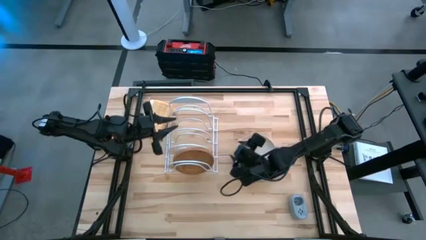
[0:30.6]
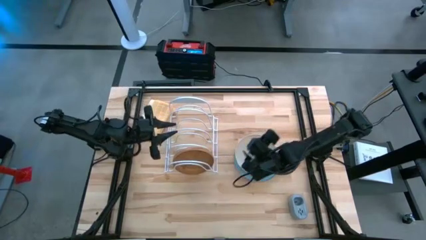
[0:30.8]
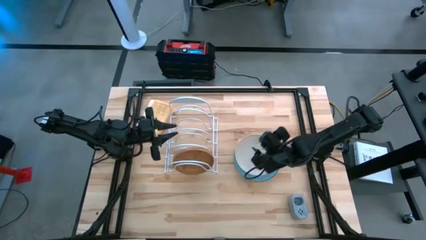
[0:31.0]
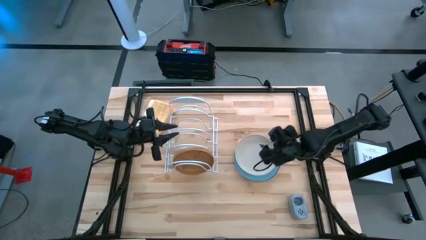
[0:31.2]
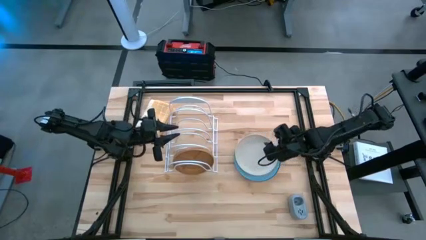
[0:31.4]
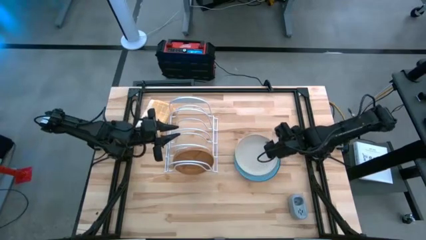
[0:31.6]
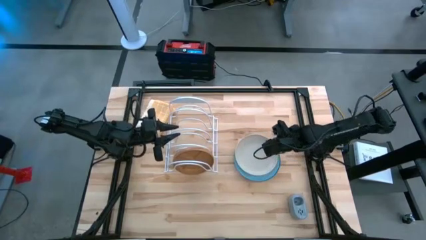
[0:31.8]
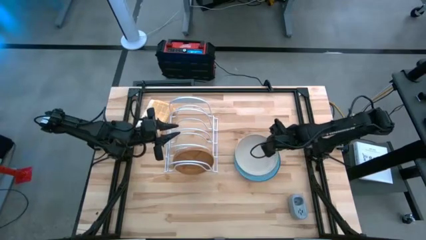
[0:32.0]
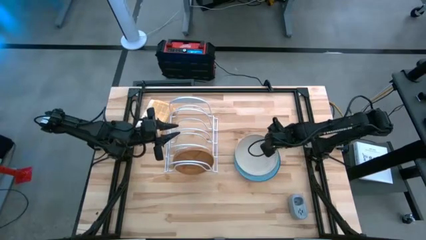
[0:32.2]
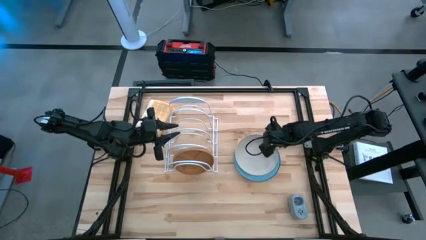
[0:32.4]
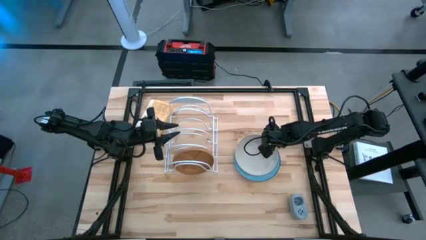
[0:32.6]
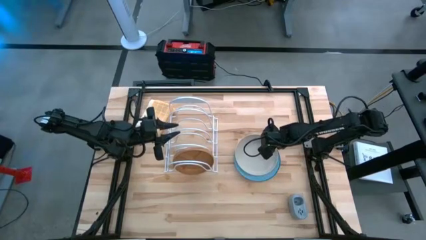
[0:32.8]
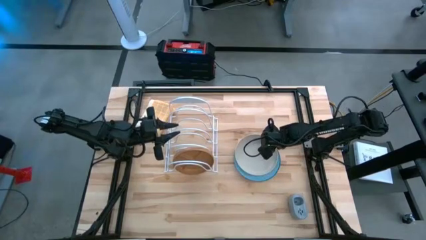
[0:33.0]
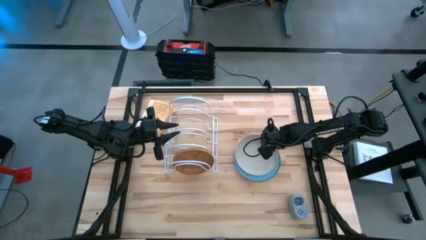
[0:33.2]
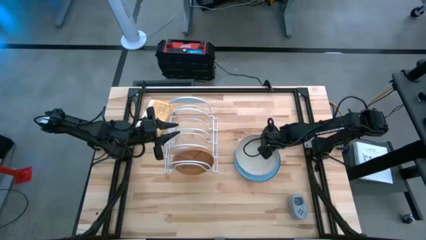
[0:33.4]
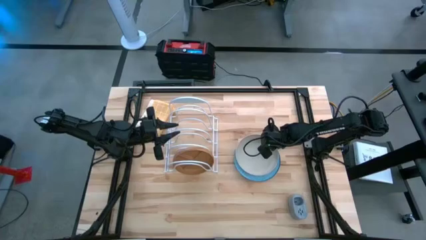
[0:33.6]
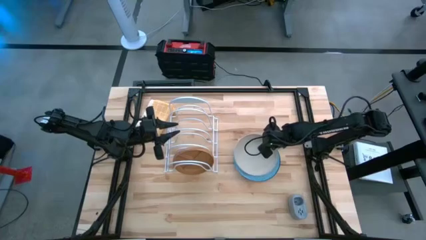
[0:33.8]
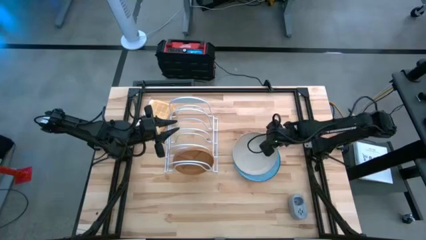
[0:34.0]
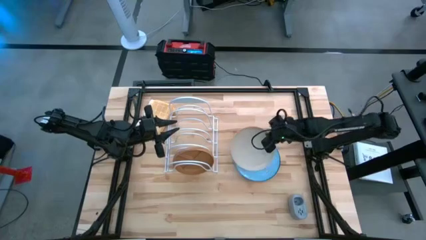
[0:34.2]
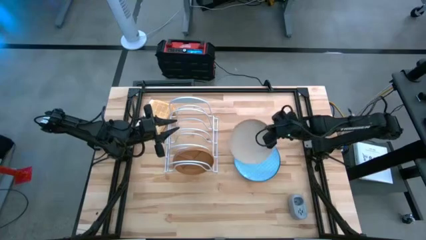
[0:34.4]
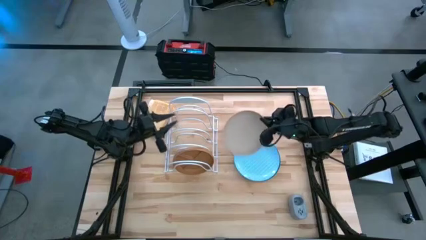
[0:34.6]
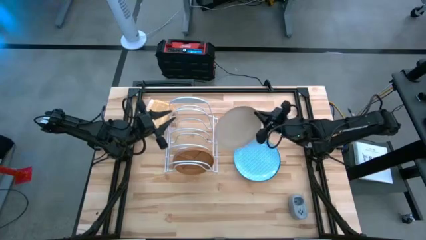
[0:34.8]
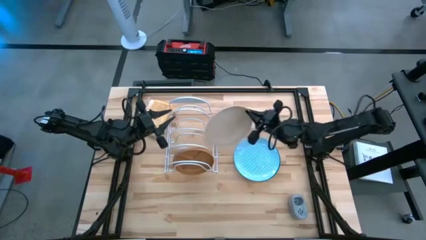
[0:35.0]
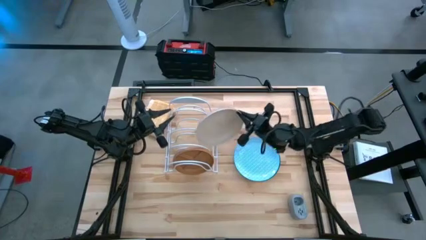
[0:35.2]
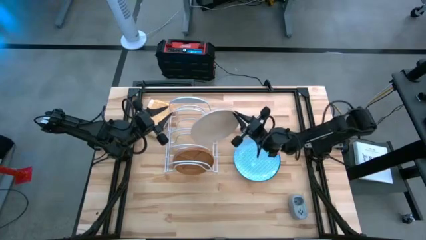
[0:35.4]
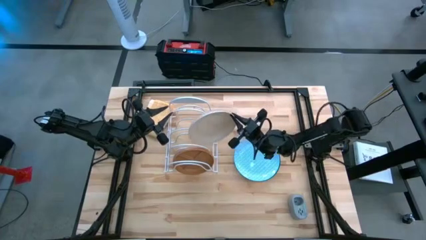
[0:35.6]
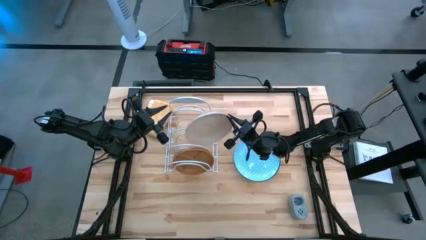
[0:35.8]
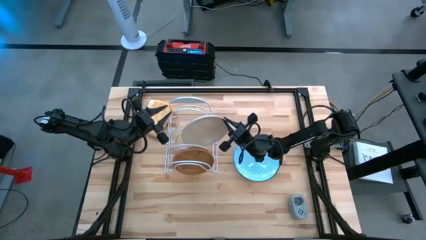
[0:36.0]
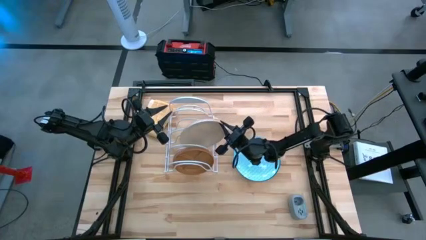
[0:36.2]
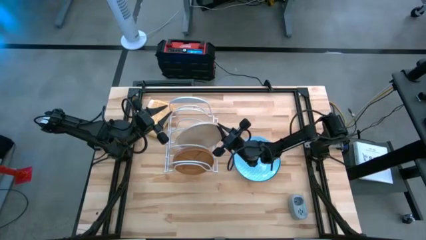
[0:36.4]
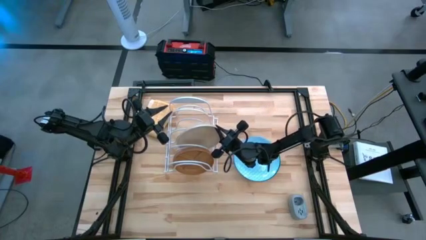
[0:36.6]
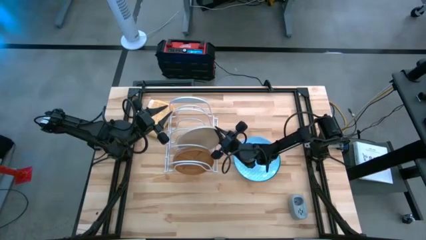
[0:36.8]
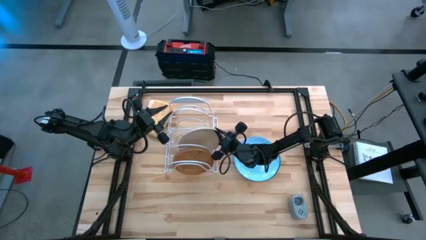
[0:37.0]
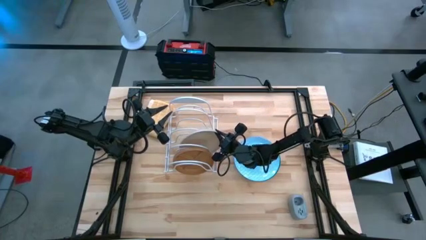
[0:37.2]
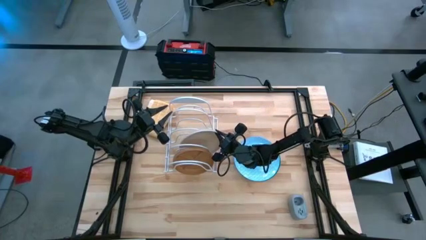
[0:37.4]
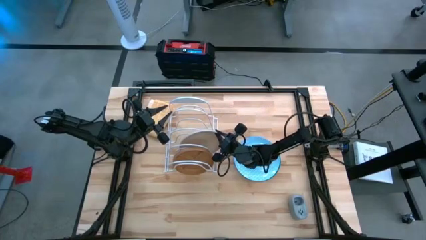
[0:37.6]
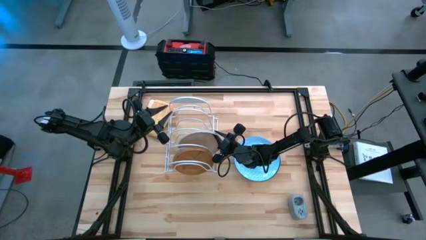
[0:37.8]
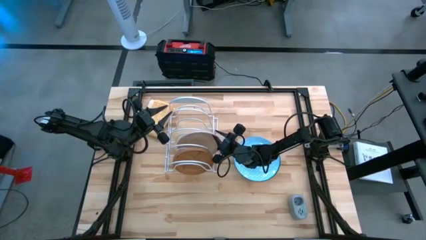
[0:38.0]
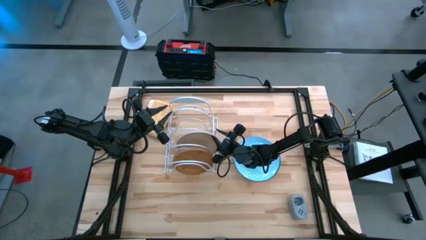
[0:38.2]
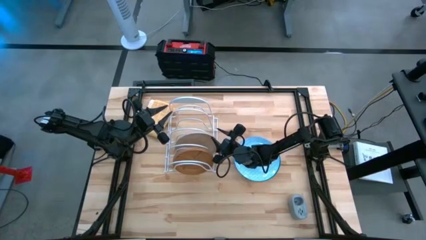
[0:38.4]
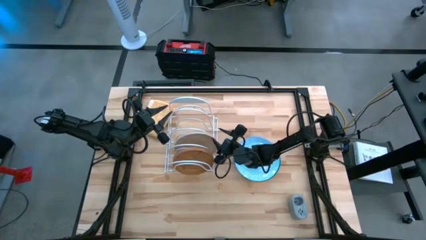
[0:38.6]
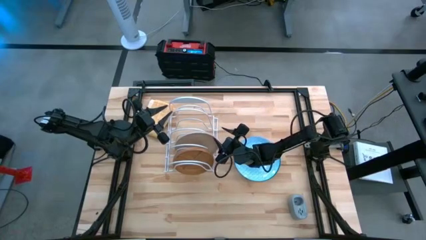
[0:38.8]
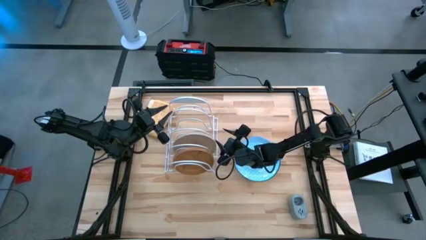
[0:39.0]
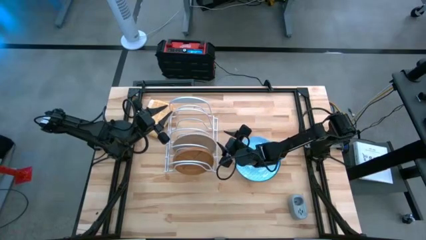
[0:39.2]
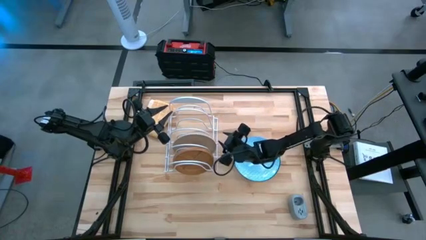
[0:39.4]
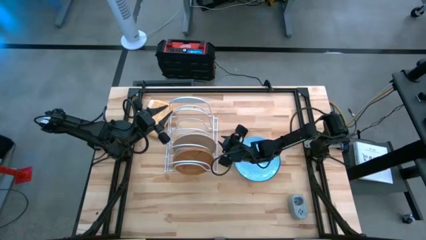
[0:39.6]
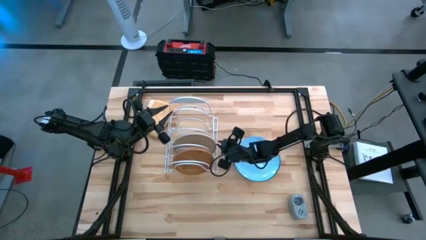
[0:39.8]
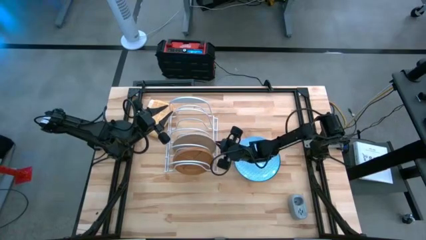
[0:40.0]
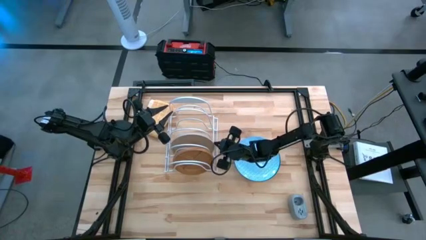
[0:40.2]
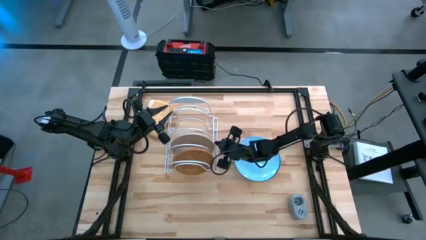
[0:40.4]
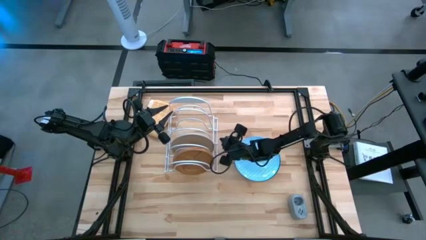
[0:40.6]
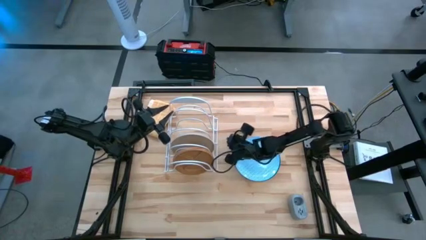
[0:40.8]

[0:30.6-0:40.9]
Task: Sort dishes
Put the white plate into the dishwasher rack
